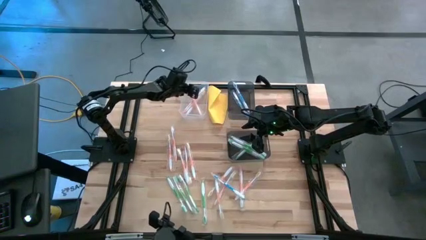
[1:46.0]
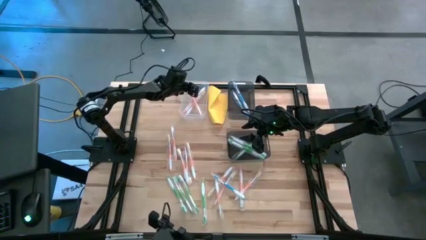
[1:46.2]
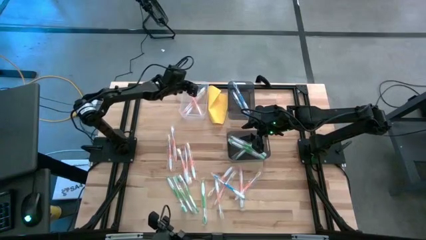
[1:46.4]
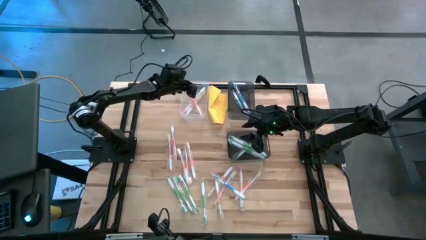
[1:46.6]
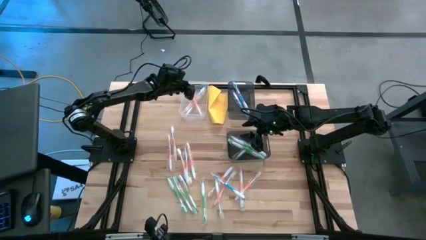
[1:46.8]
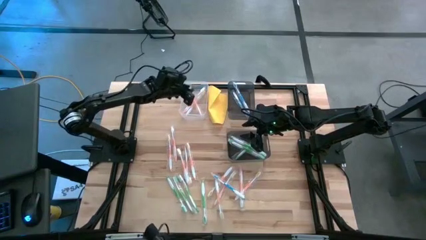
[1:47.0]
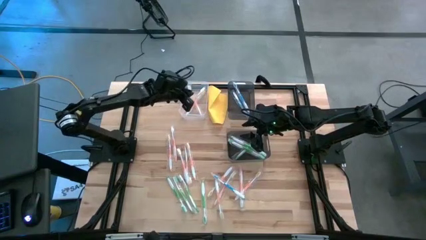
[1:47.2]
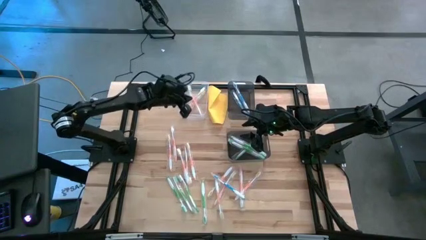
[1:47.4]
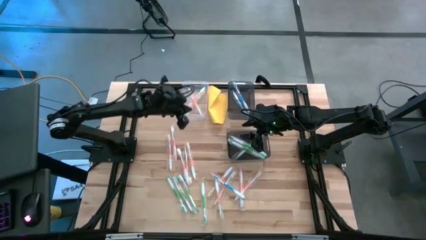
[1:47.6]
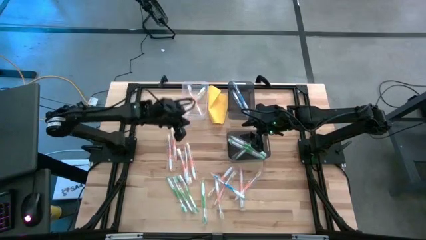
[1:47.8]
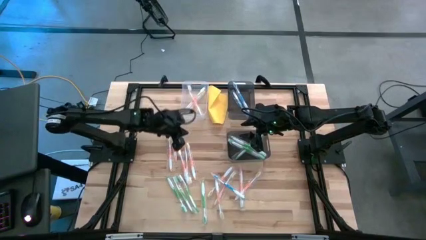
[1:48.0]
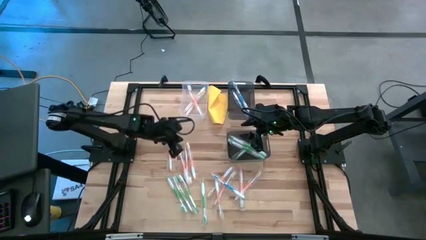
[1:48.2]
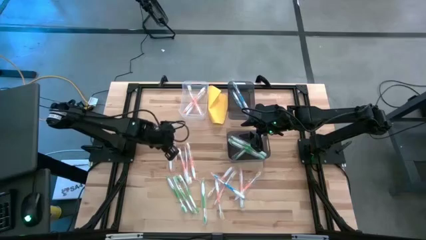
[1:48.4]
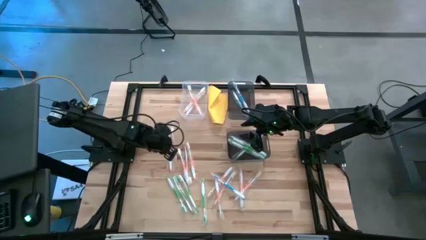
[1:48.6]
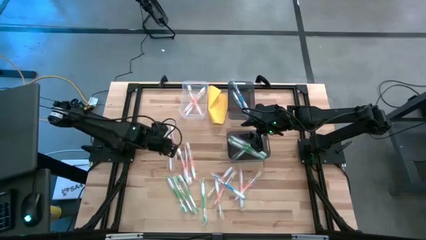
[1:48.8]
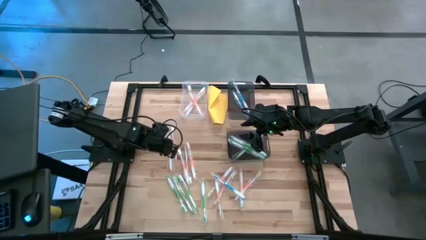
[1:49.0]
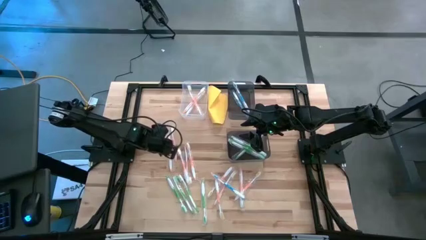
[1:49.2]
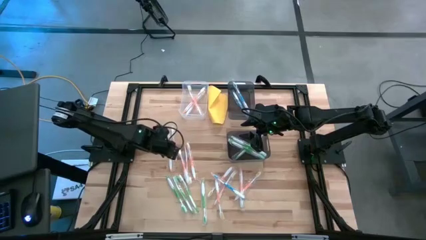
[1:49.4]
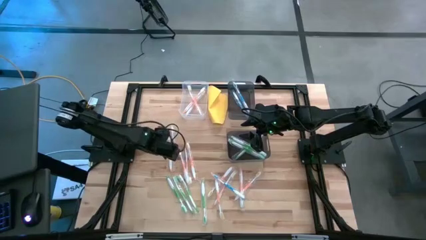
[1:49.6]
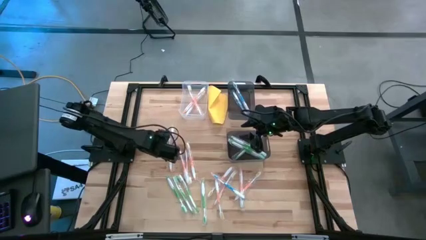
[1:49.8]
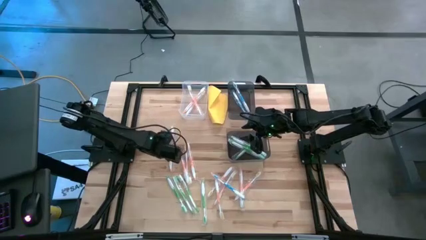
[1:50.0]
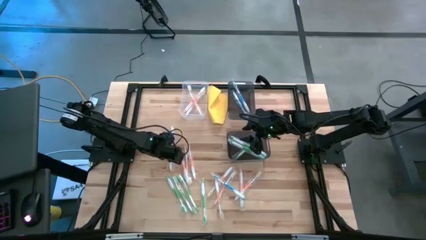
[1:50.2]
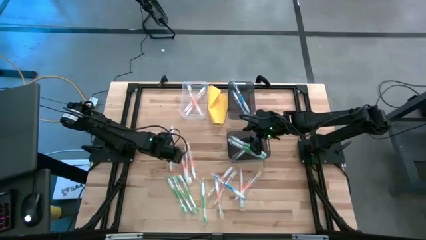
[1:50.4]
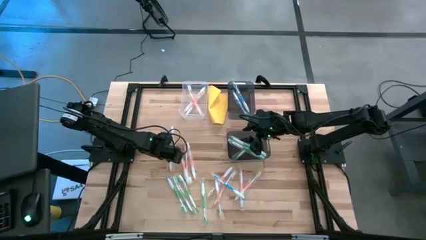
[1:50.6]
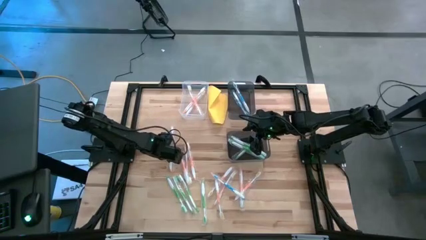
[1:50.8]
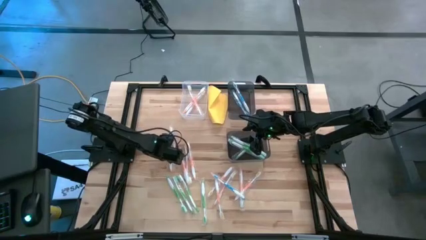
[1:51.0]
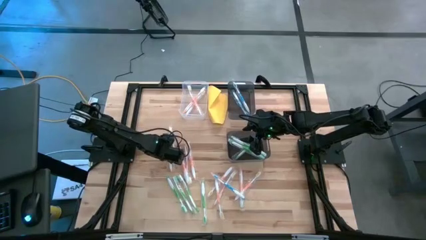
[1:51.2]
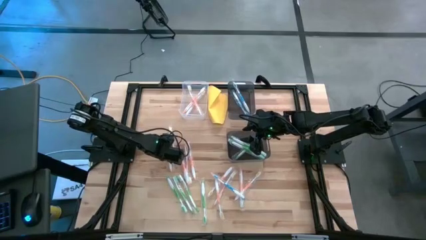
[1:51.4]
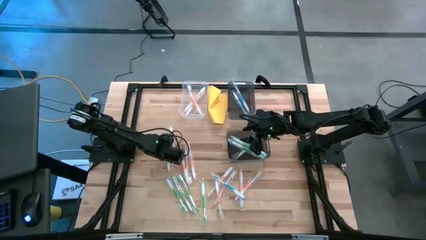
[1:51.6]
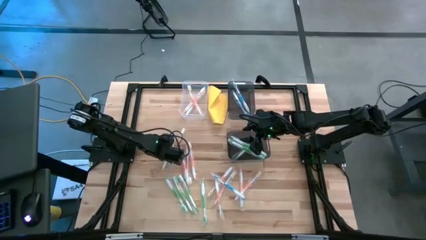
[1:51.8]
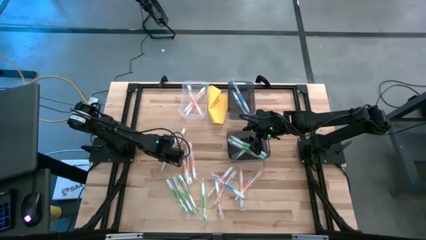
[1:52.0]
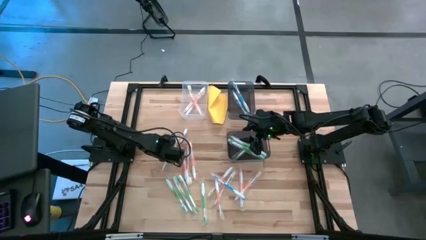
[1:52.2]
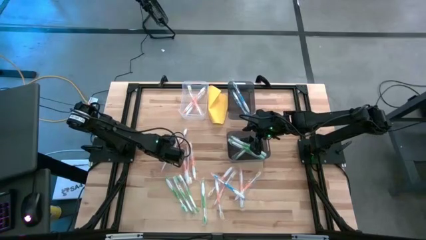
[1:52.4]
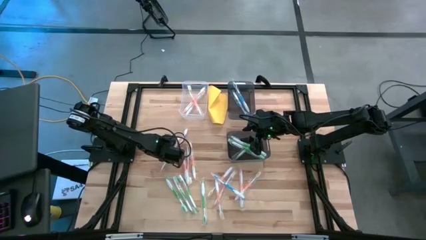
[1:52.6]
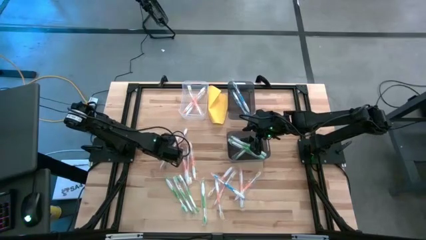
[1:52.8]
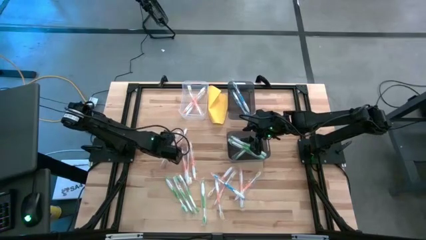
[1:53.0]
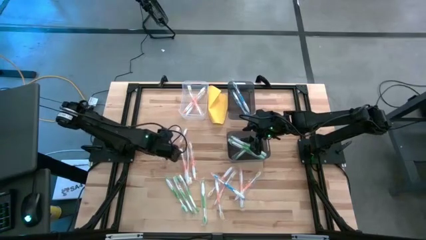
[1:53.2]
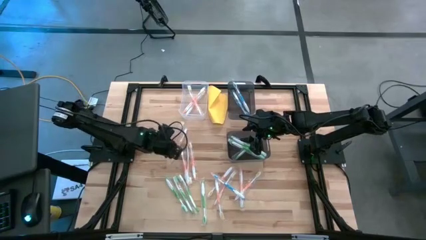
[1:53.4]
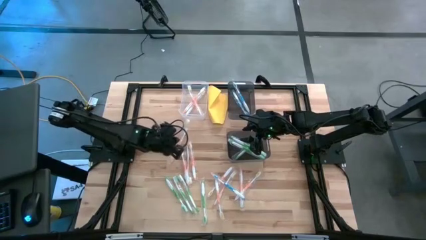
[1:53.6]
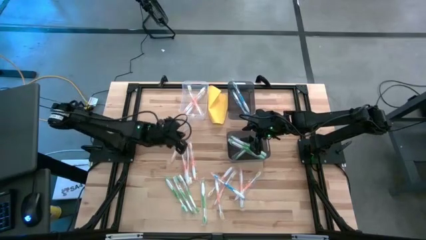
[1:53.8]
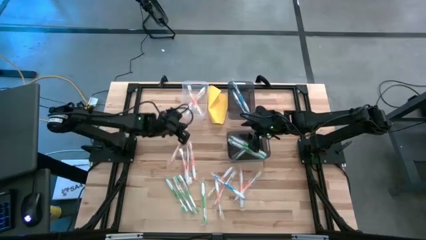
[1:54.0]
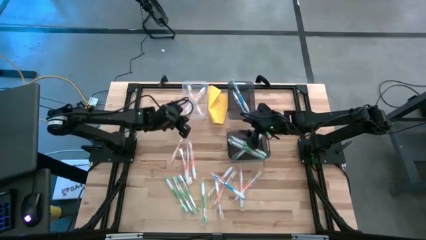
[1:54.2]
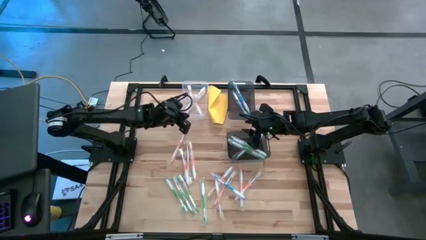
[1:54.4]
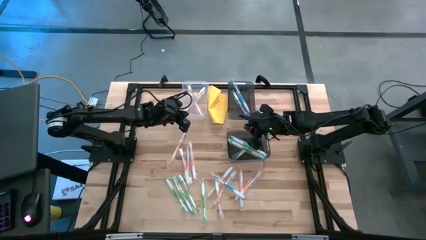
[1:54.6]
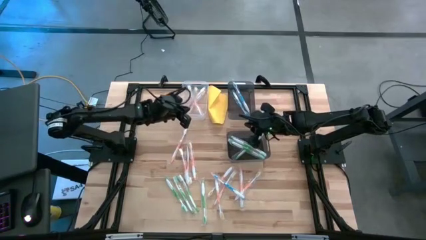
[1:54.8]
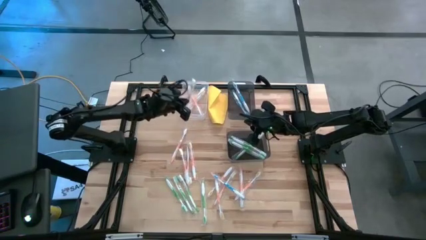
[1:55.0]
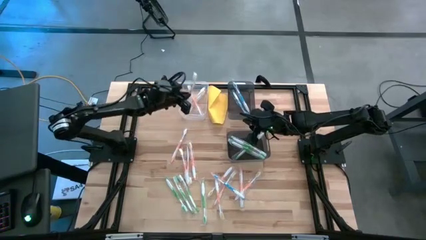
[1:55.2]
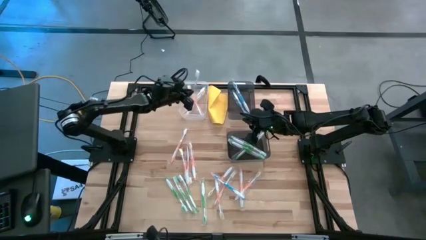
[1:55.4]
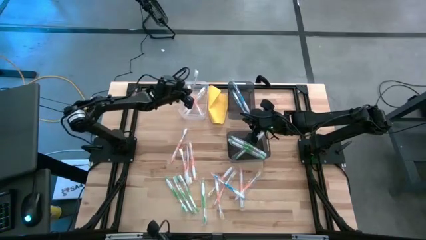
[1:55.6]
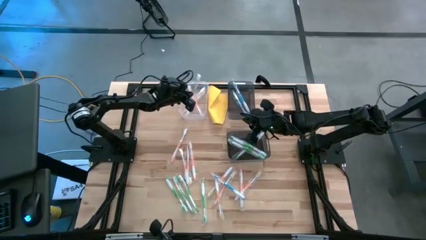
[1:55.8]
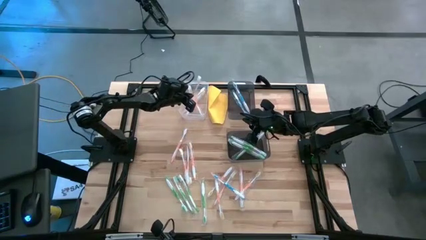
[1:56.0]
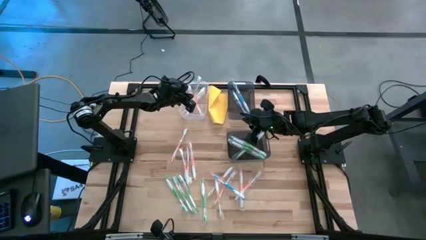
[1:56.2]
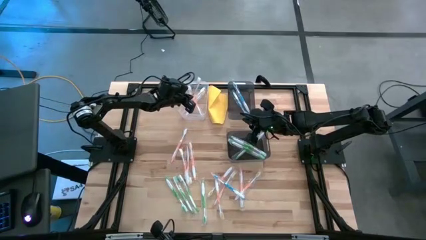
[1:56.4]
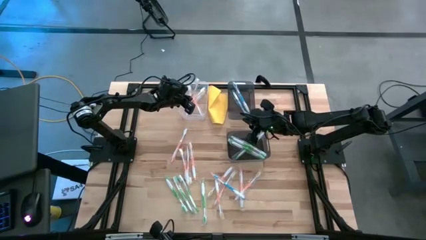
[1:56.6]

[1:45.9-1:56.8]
Task: Pick & Place Toothbrushes
Put the orange toothbrush into the transparent bin

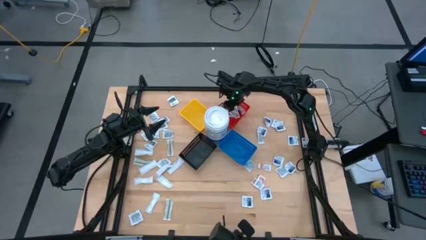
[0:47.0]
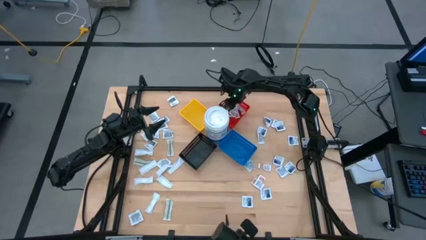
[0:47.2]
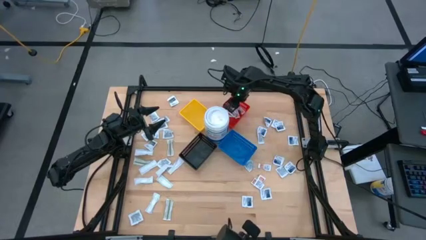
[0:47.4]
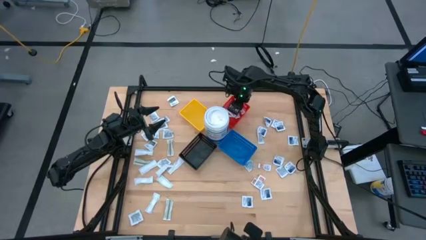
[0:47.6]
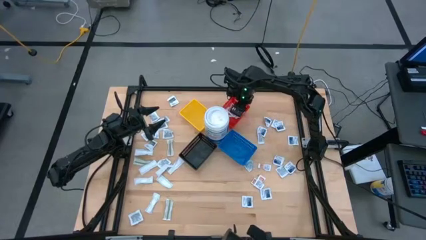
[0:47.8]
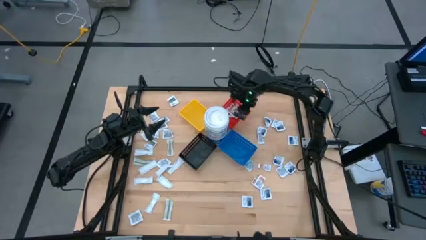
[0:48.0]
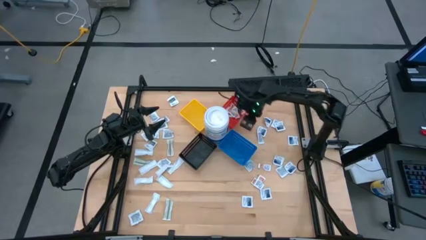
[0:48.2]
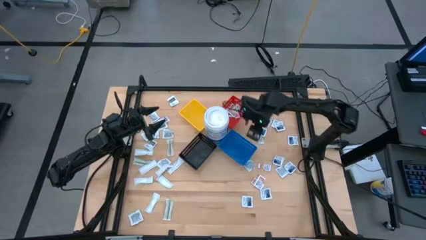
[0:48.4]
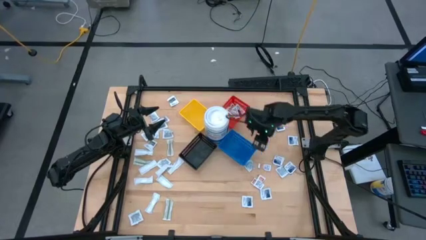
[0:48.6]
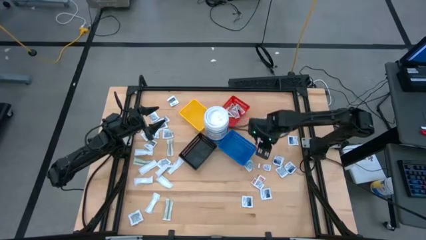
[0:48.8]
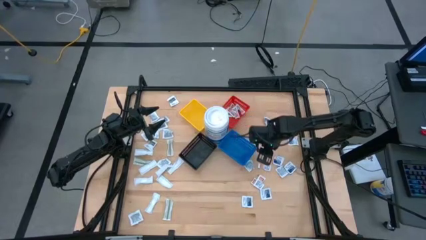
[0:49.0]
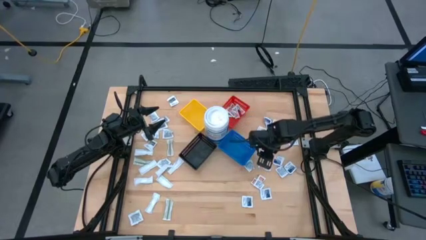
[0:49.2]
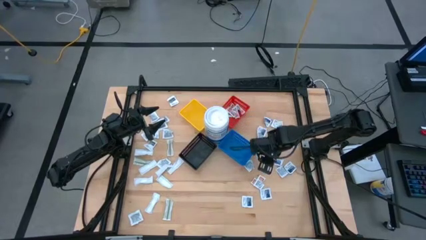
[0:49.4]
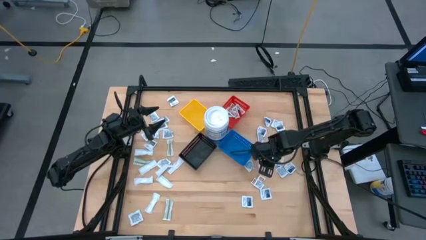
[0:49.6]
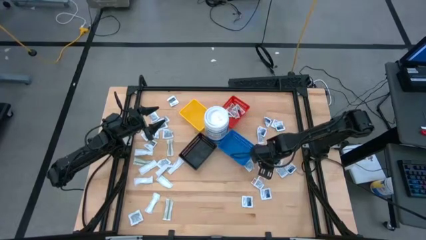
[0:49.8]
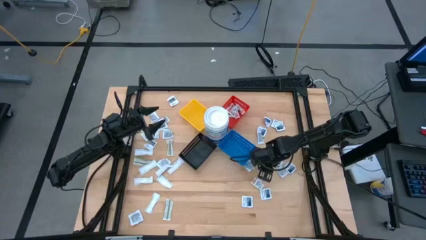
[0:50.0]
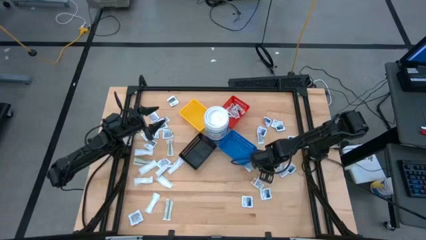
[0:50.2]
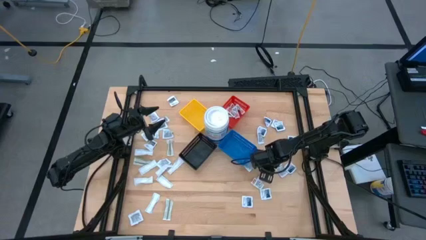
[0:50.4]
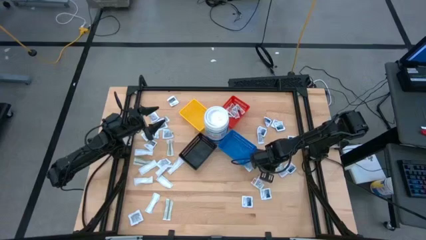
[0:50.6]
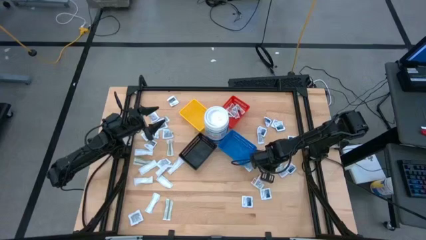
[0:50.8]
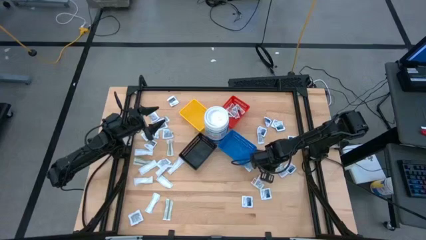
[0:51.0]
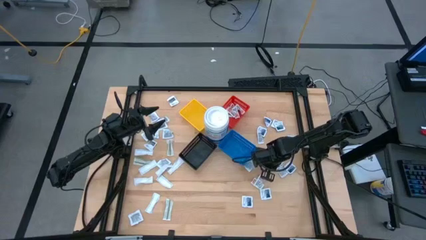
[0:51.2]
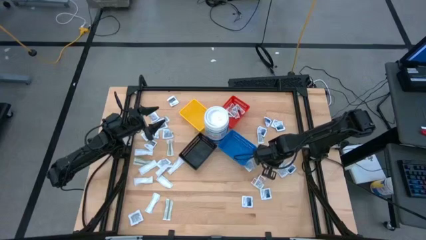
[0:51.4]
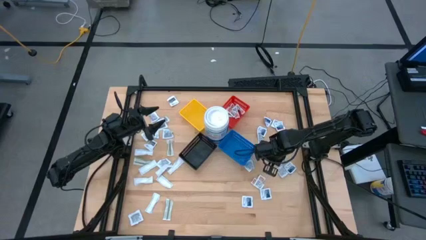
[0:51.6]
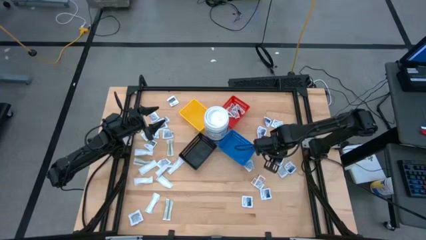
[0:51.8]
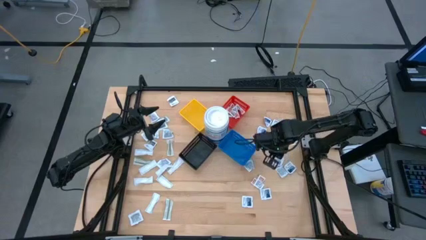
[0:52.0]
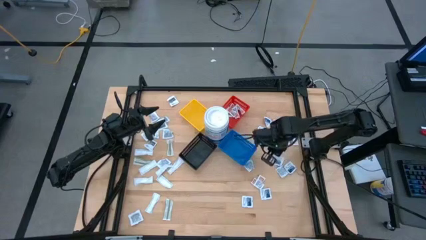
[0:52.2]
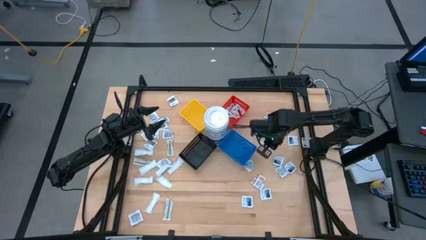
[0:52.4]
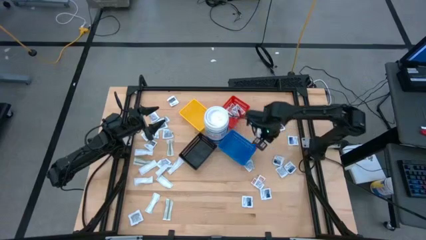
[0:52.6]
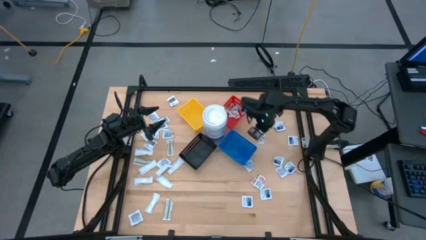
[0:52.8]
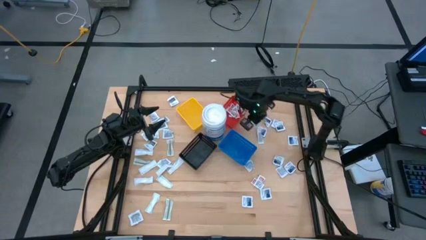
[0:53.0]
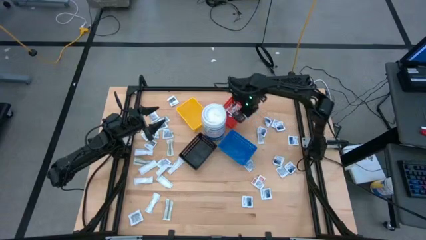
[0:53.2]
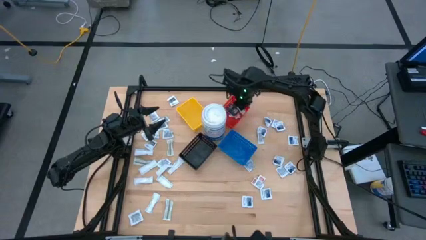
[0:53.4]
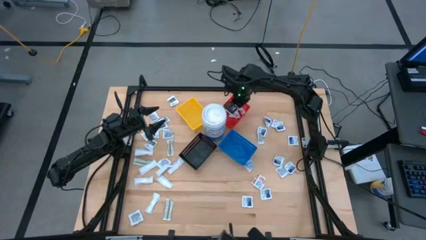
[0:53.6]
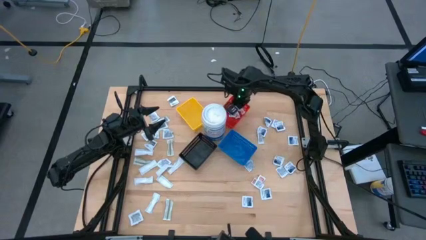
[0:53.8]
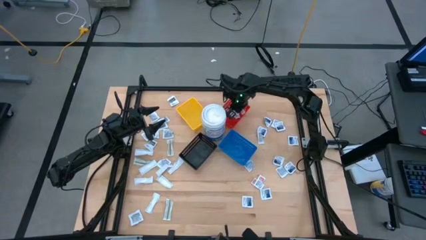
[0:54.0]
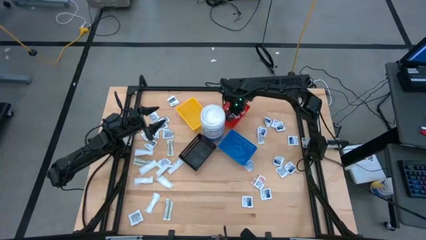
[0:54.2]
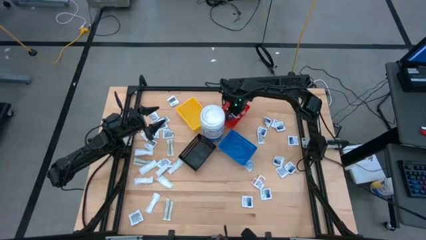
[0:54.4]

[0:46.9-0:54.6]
Task: Pick & Place First Aid Supplies
Put the ointment pack into the red bin
